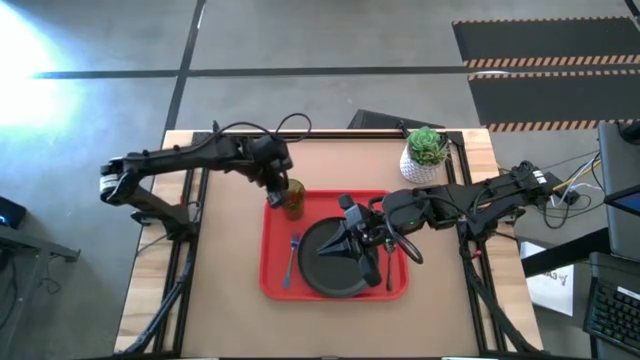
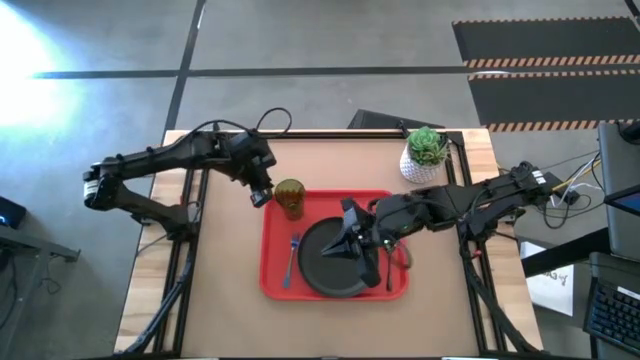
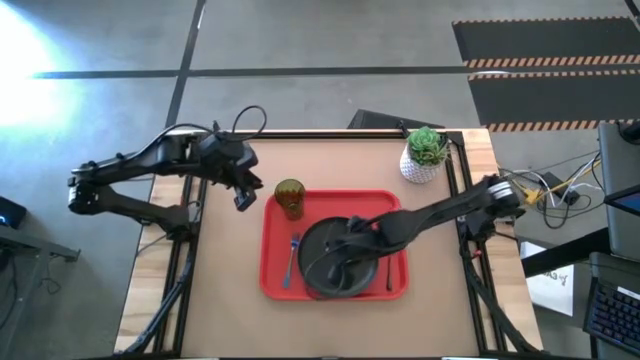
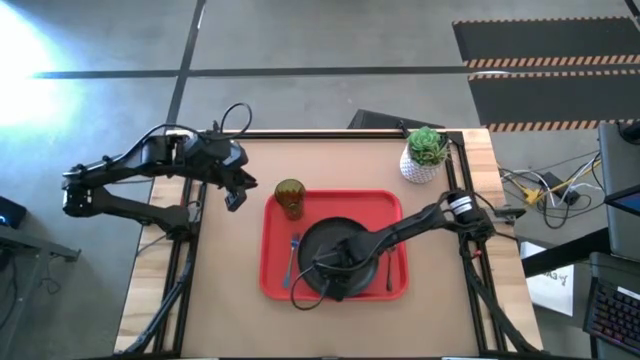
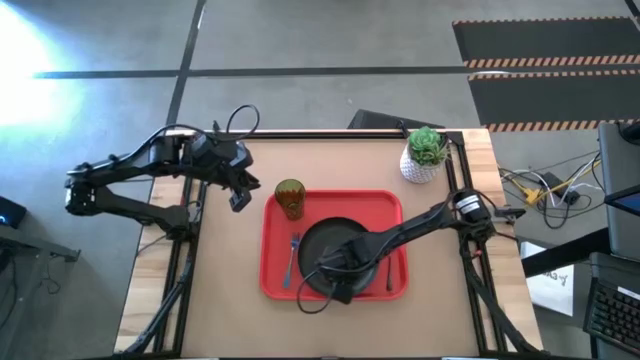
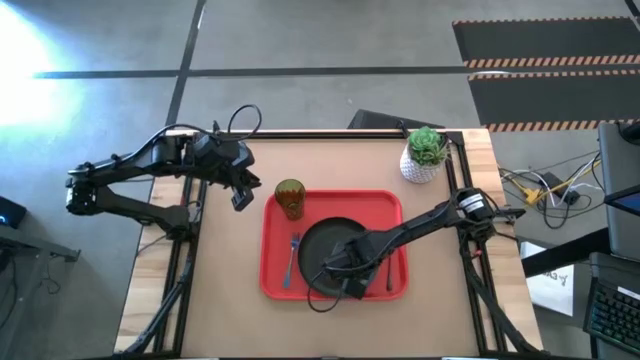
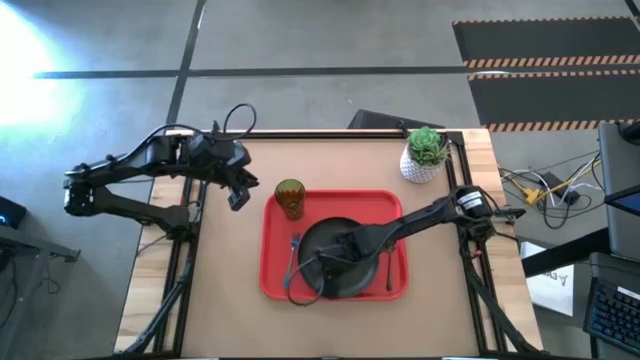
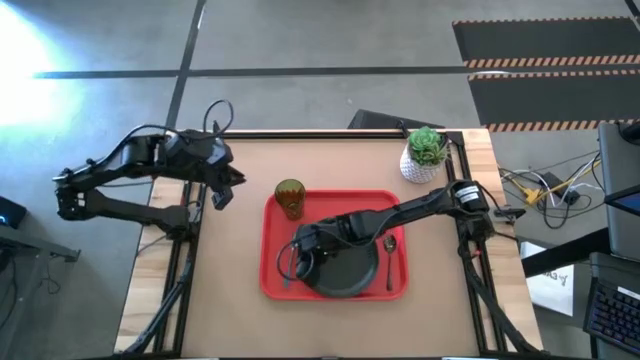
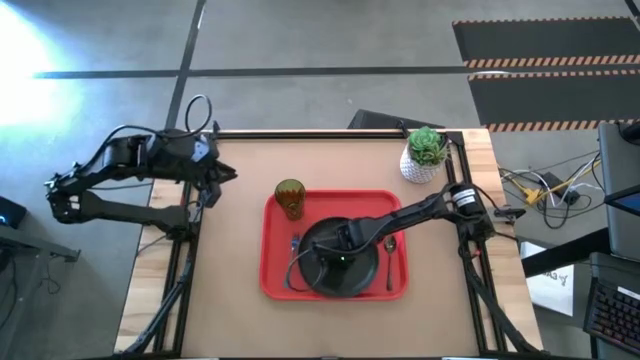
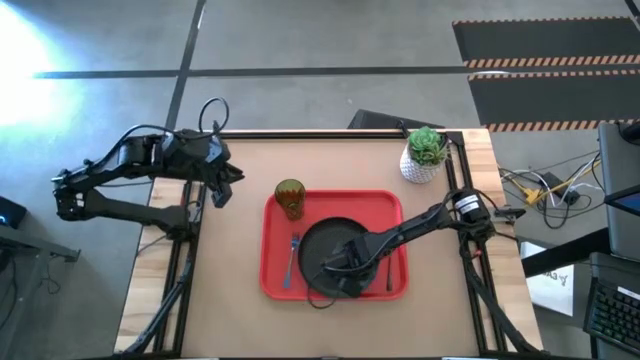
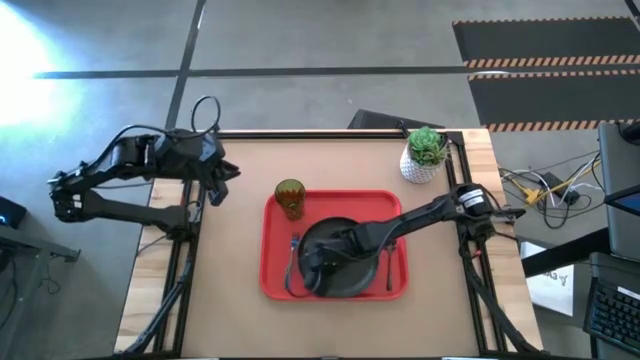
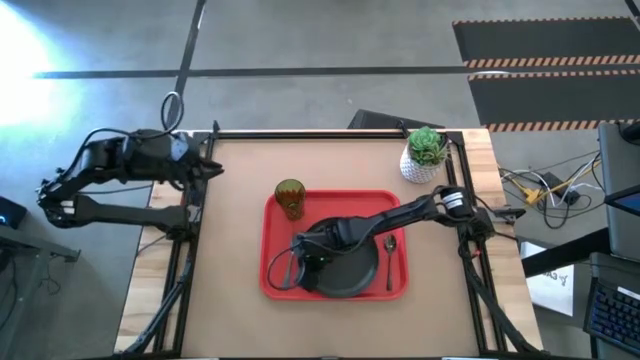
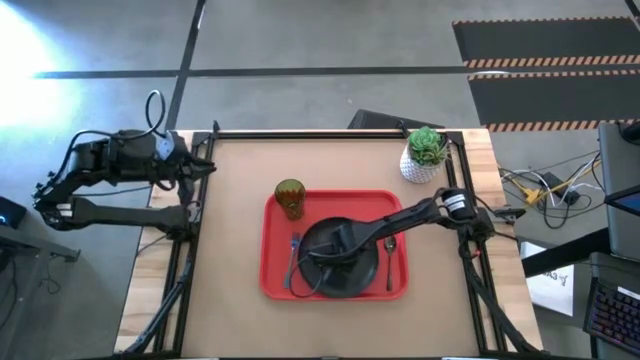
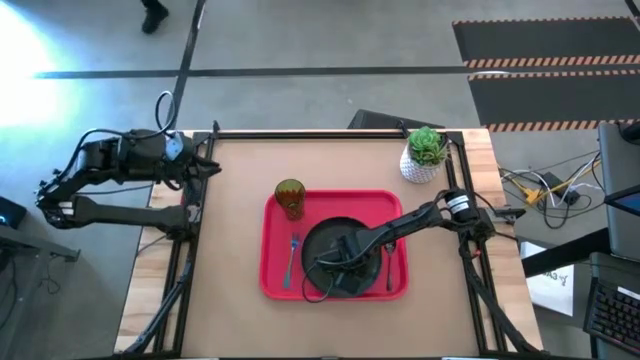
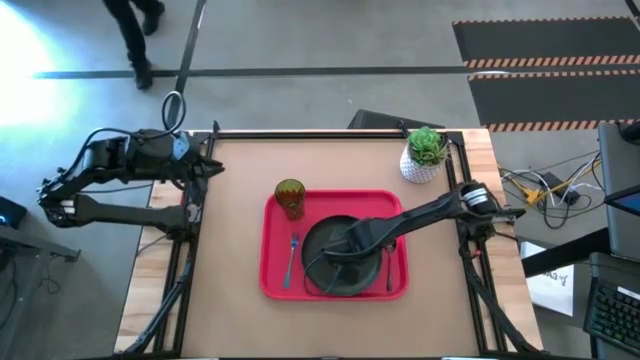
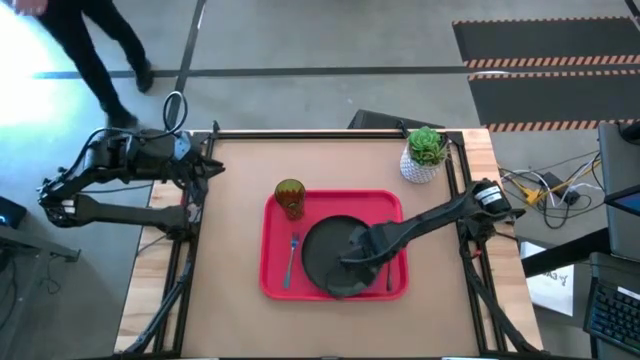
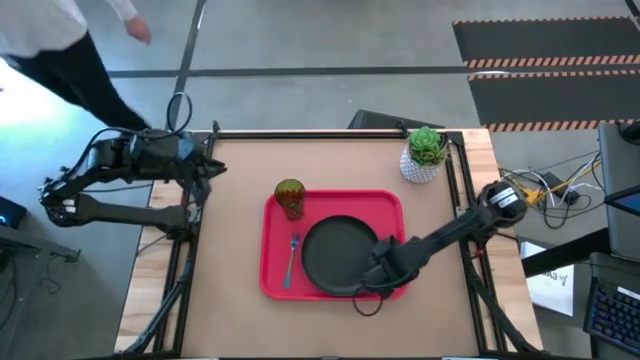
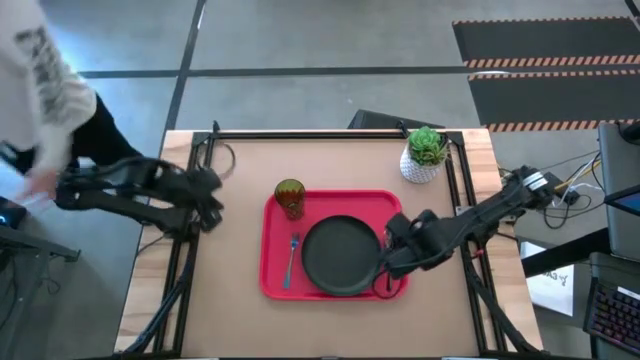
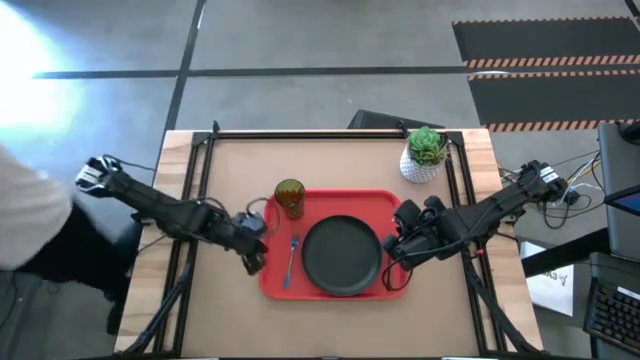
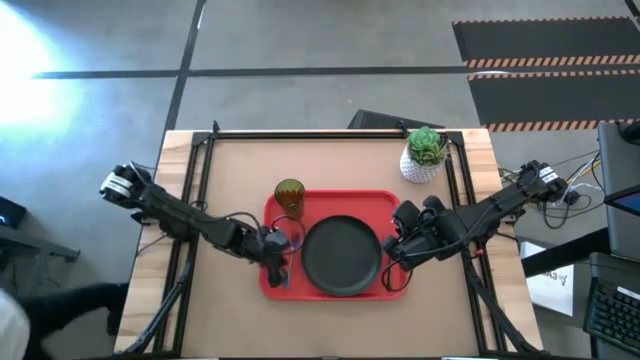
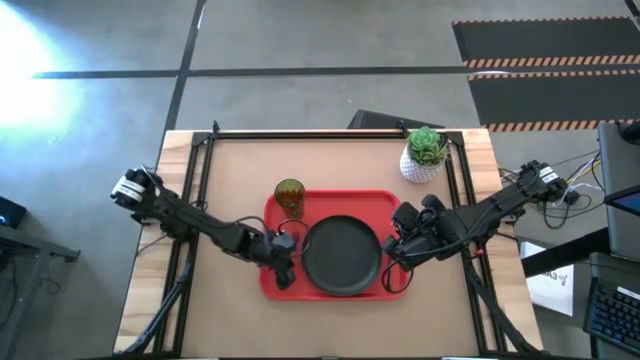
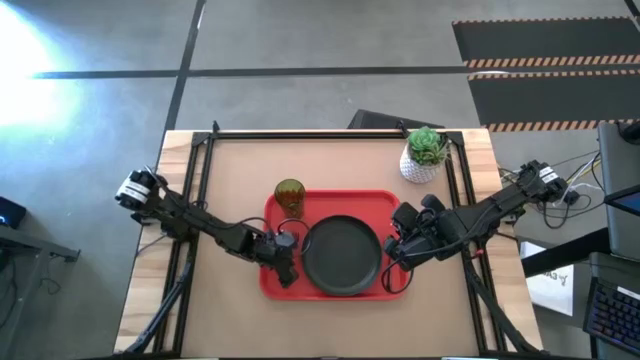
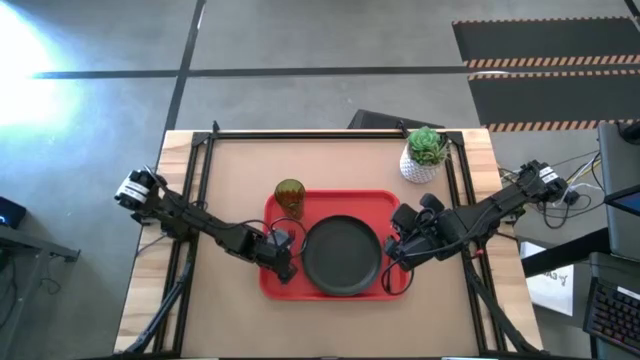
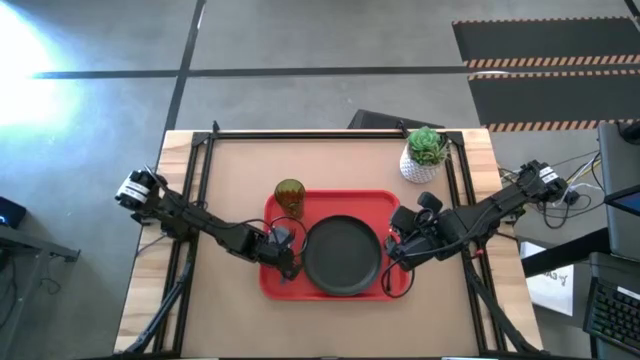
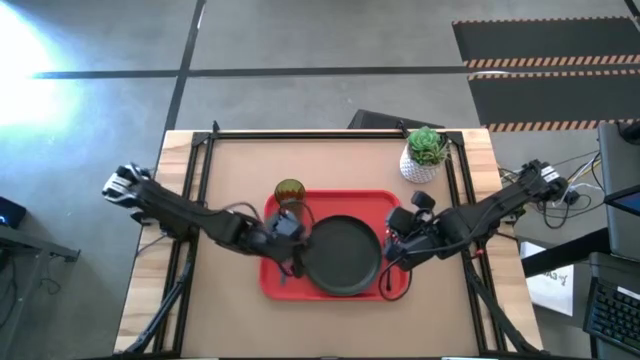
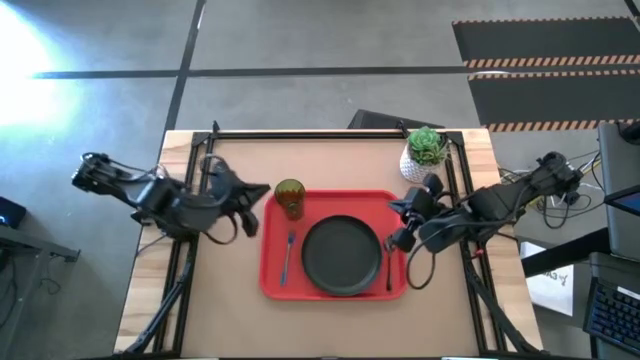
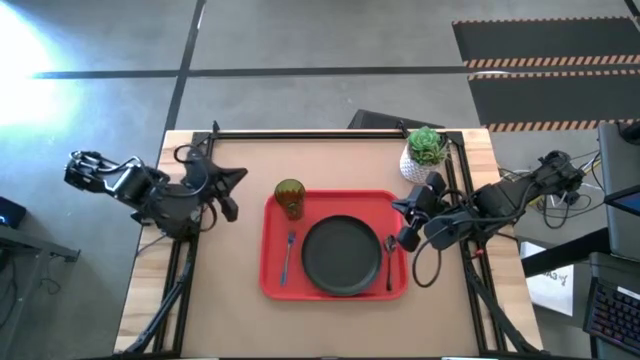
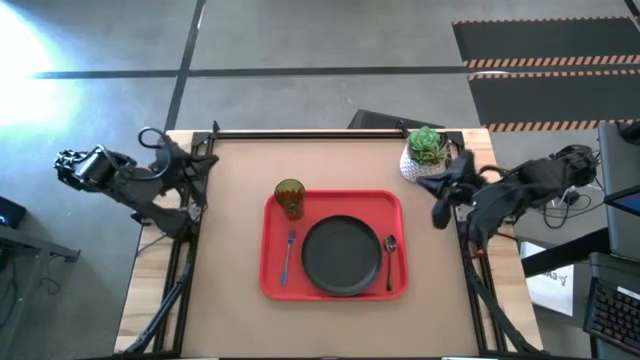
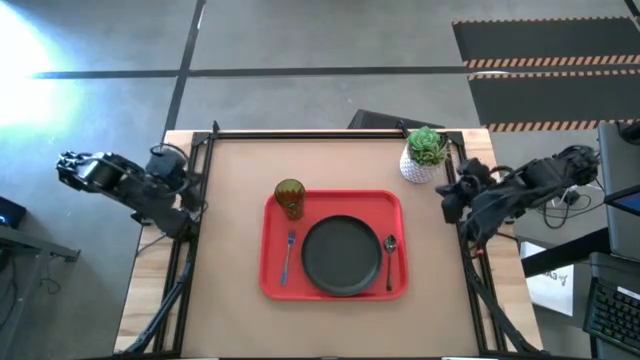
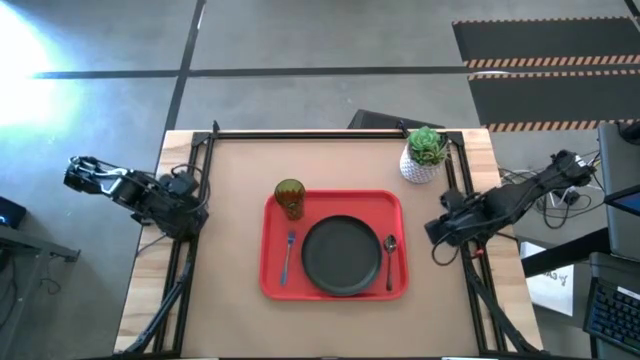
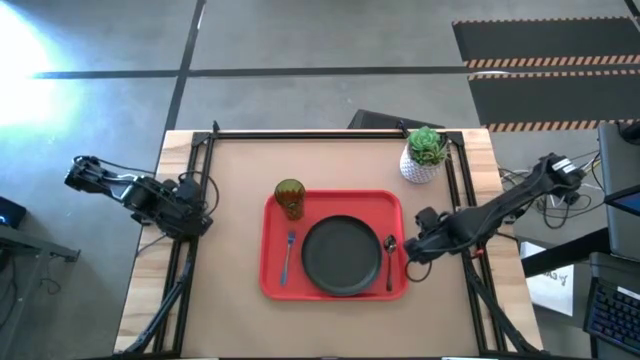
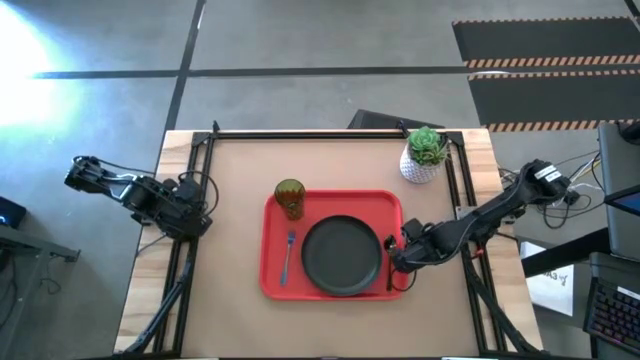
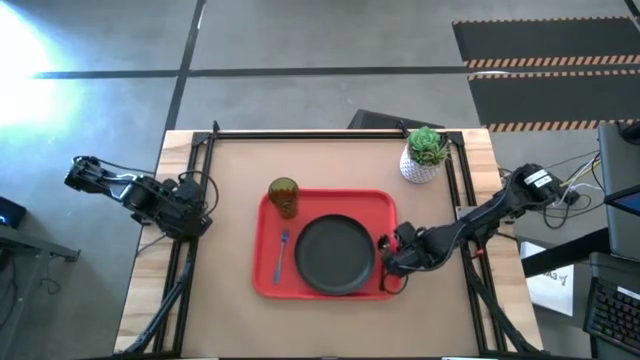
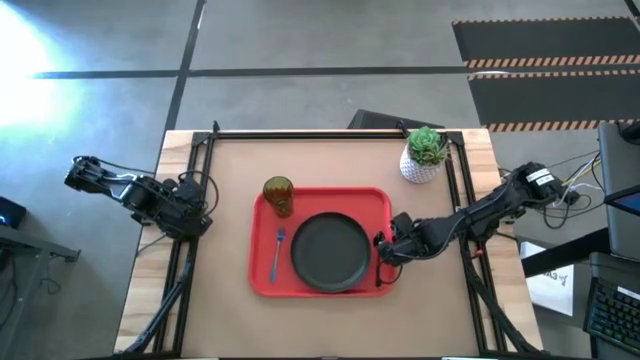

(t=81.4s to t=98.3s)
Task: Pick and place plate/cup/fork/spoon on tray
Adjust the set up tray

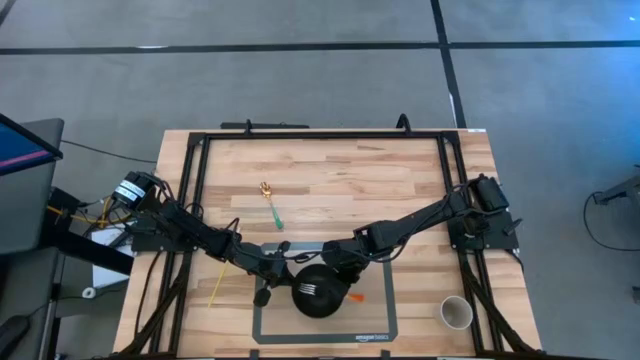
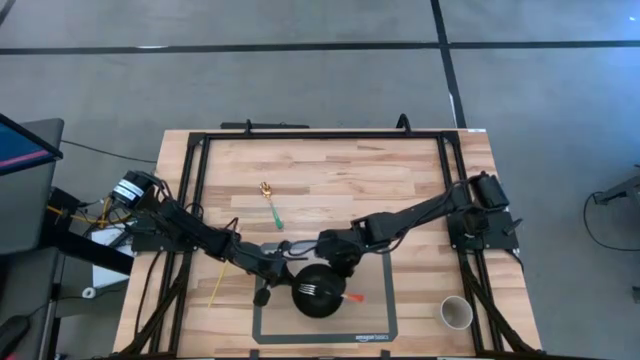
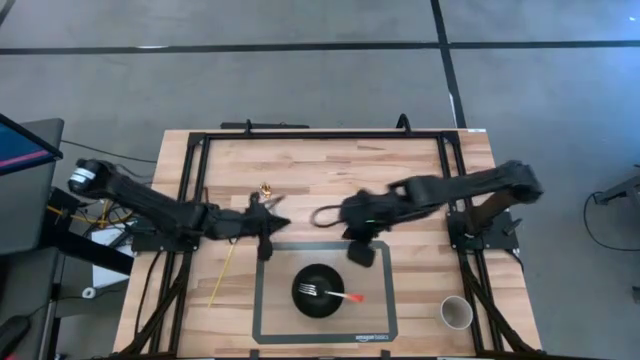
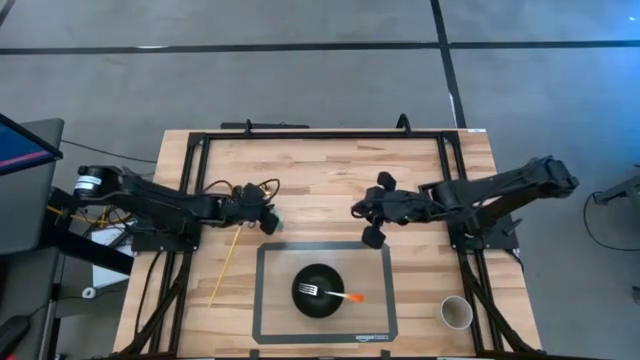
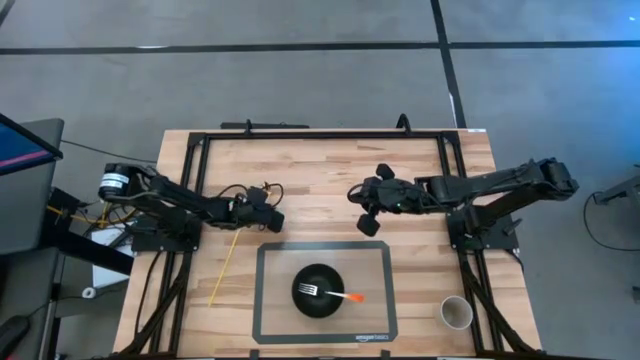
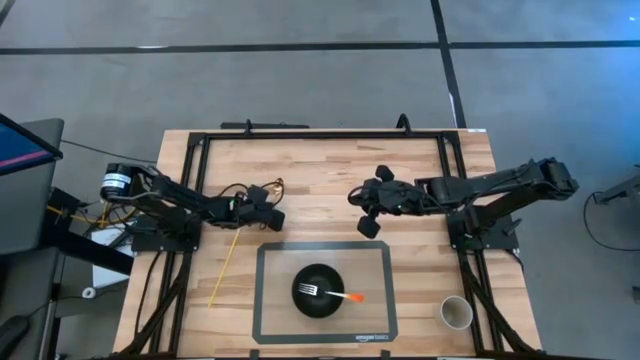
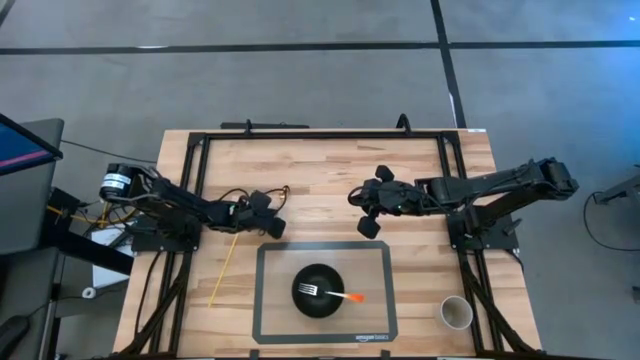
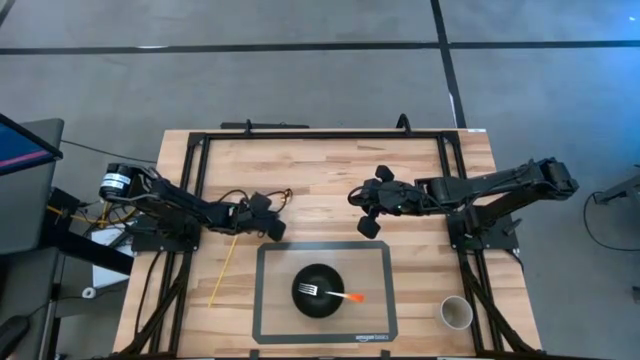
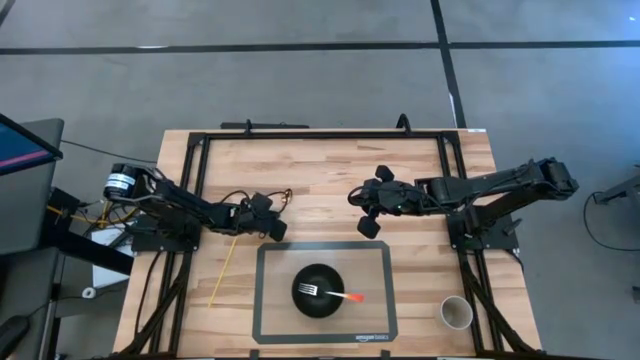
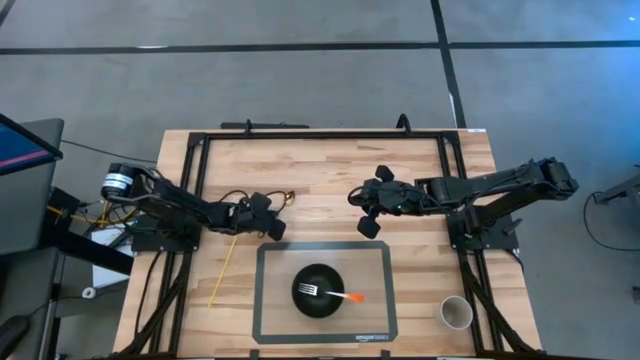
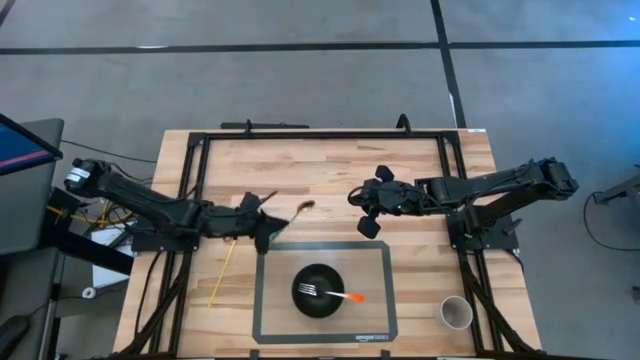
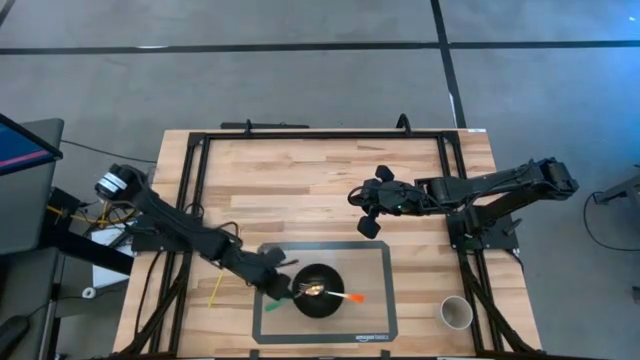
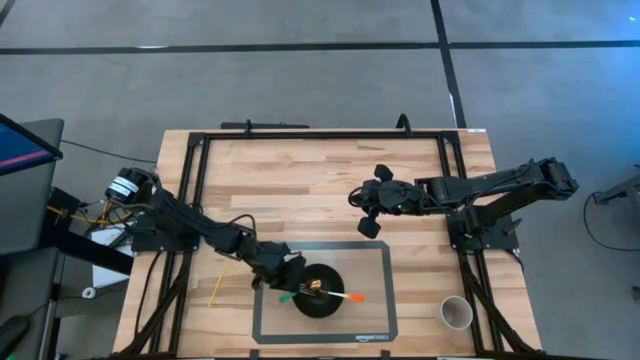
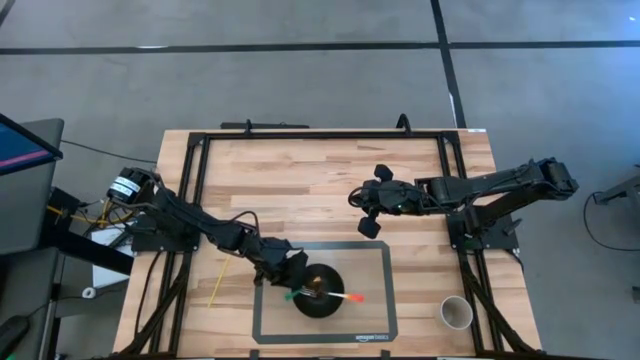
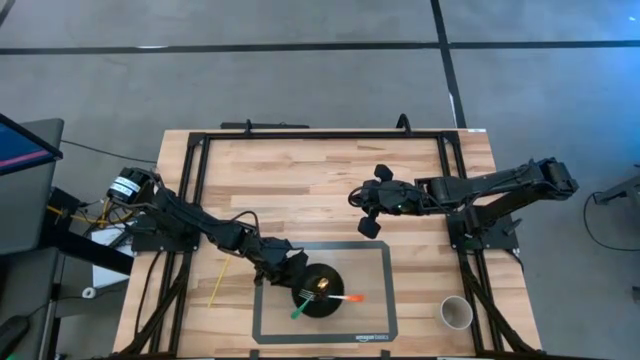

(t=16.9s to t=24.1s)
Task: Pick & Place Utensil
Put the green spoon into the the black bowl
